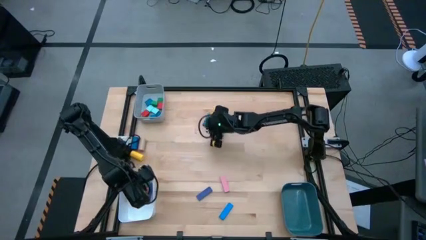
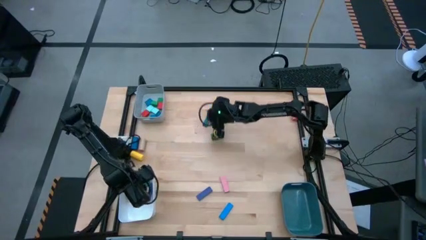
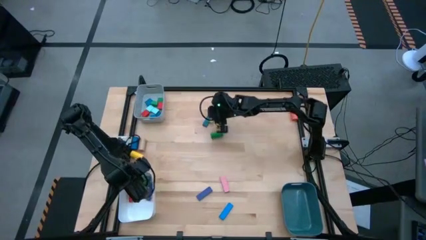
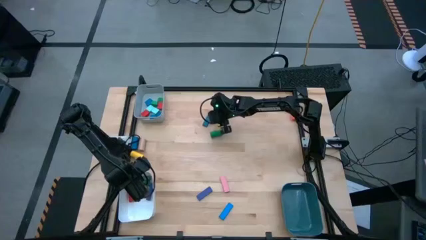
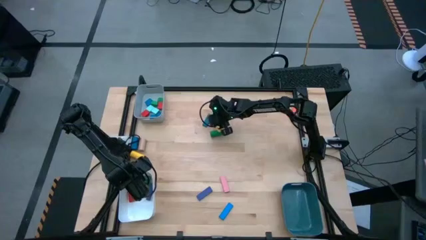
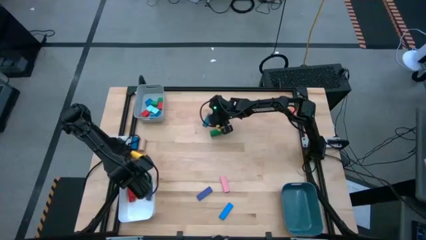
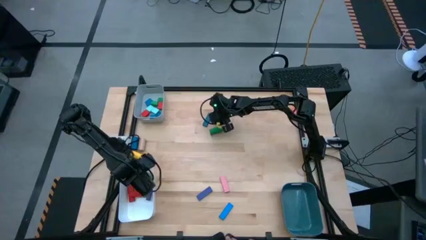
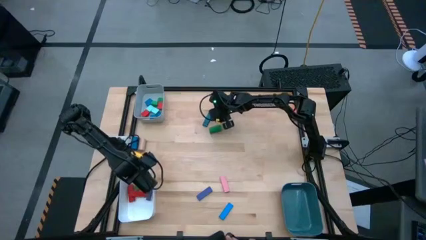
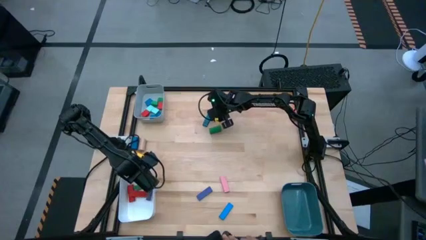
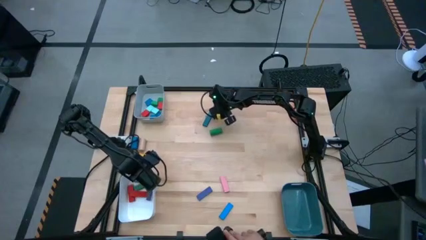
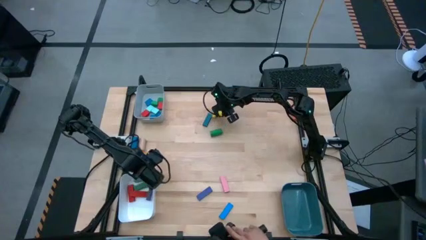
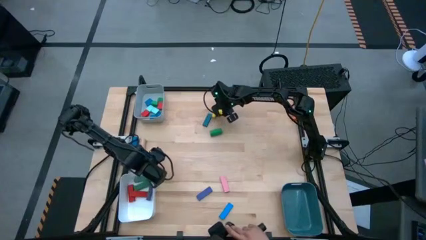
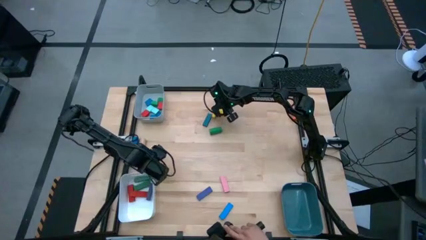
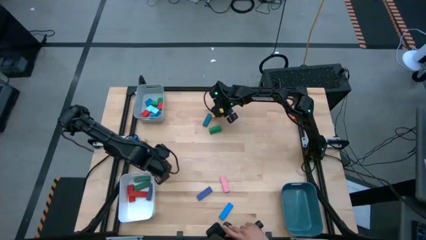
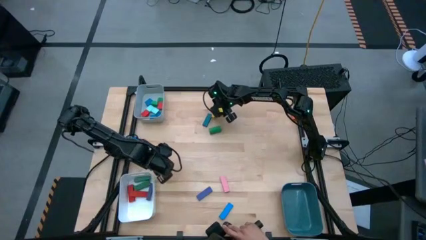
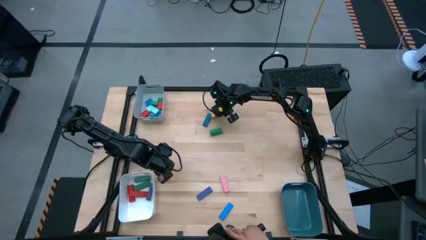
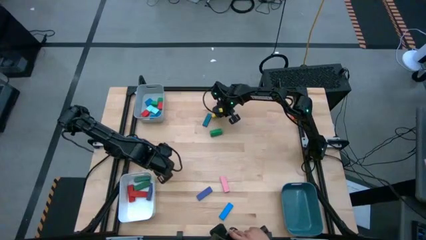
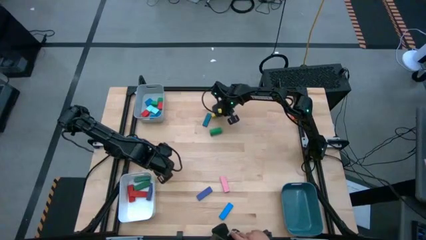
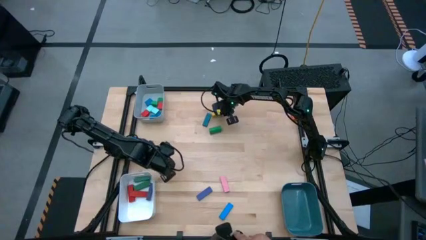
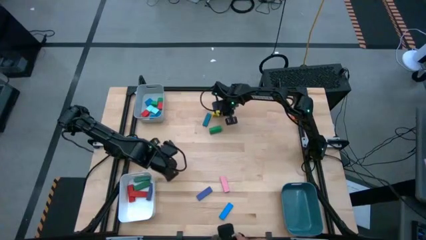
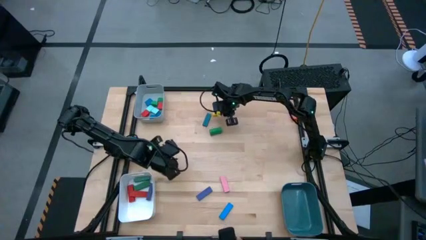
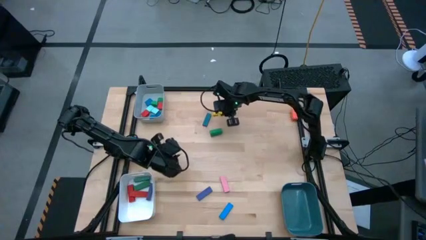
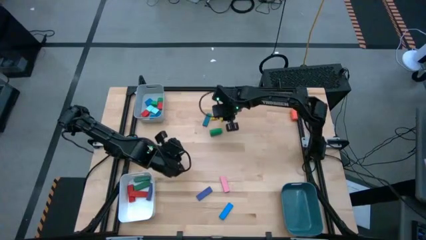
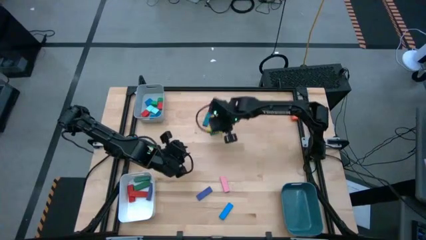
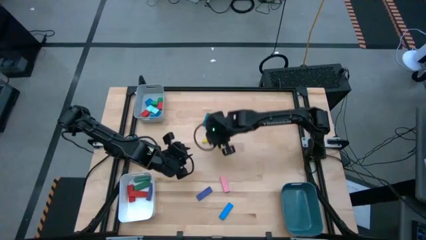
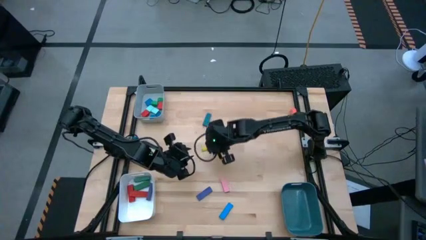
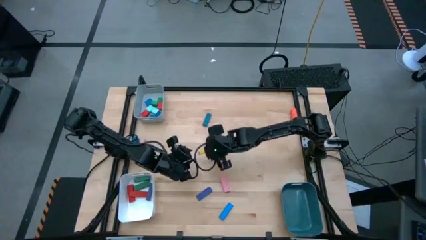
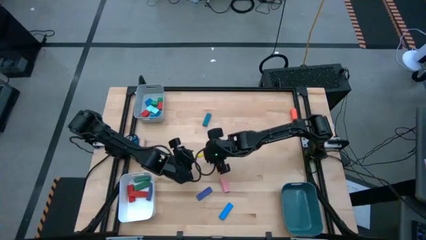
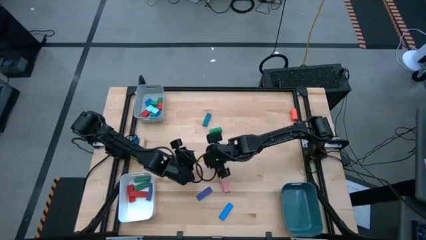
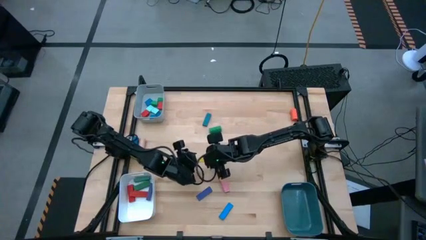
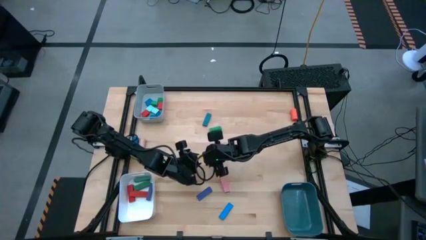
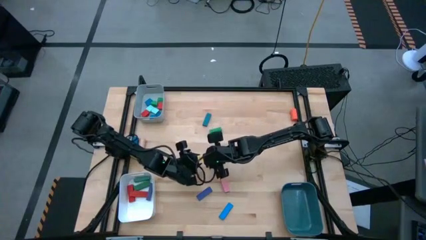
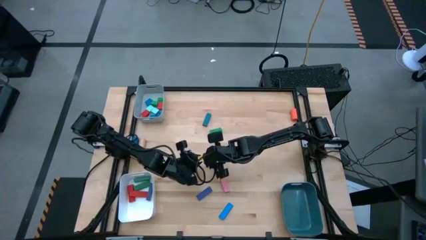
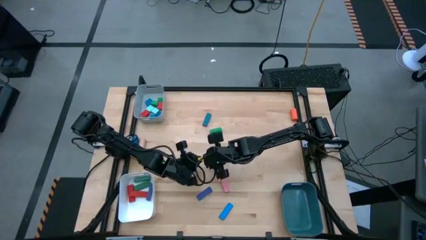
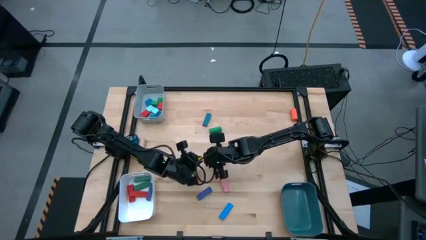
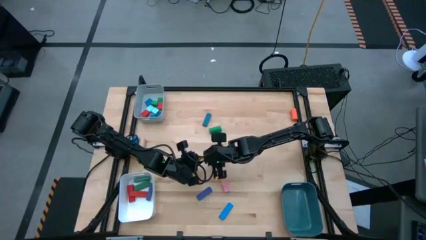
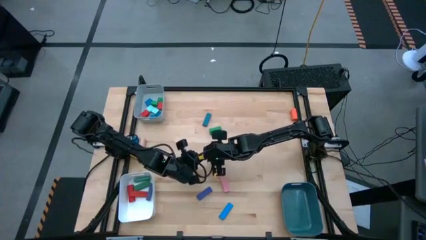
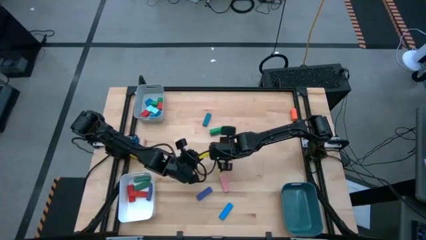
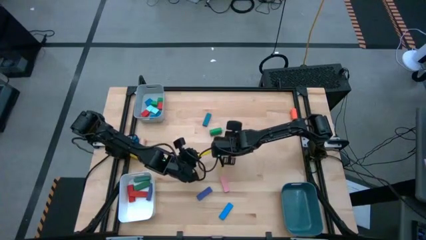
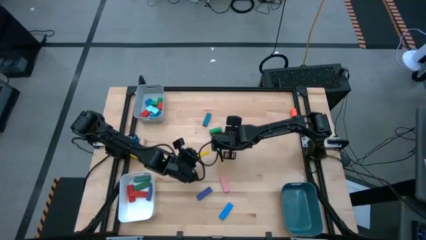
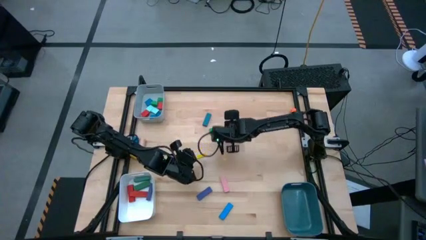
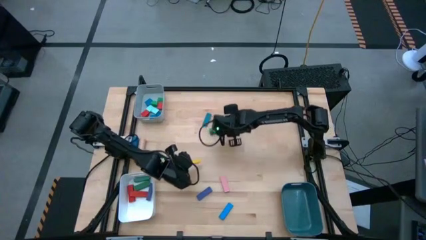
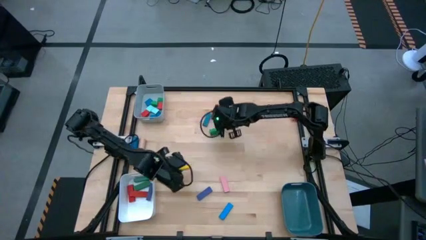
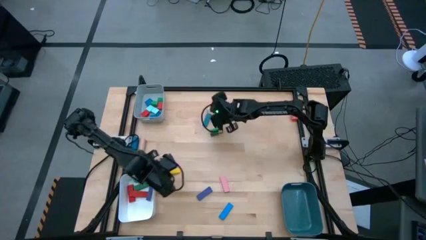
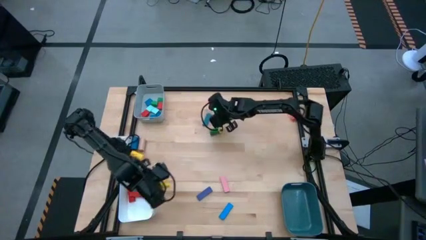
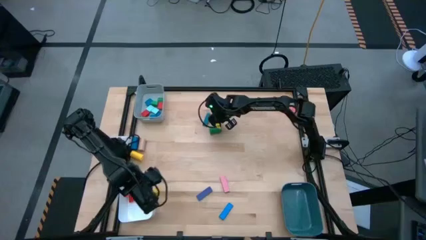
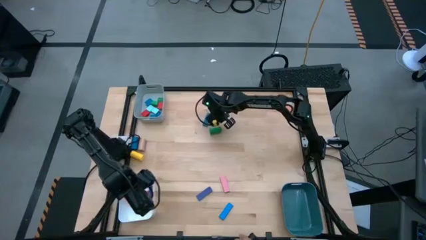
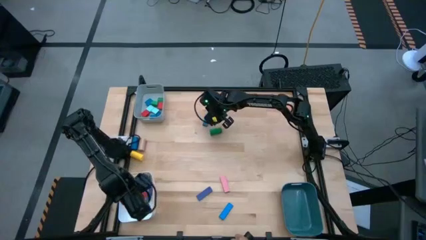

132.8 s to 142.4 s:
Task: Sort blocks by size
Put the yellow rectangular block into the white bin

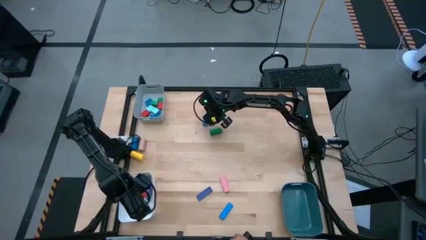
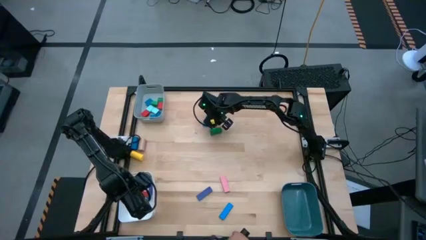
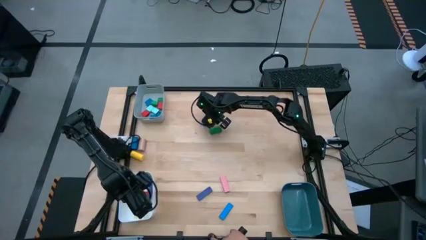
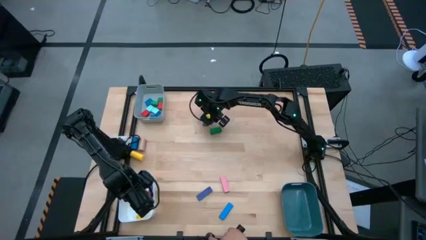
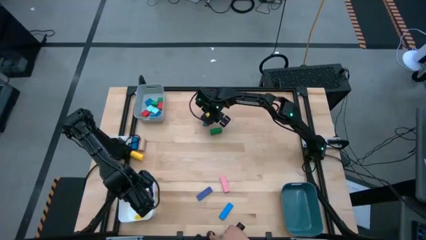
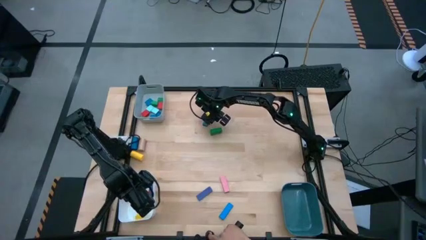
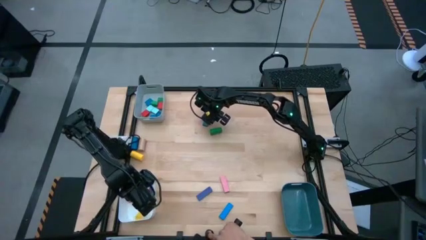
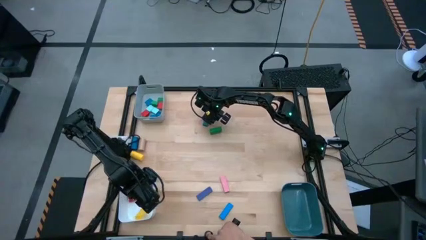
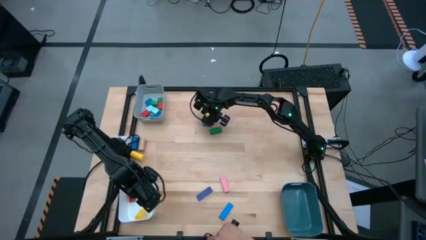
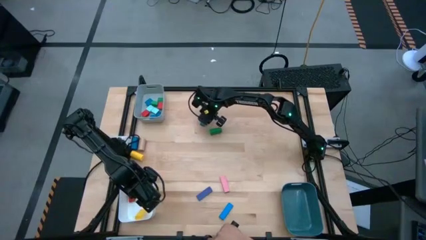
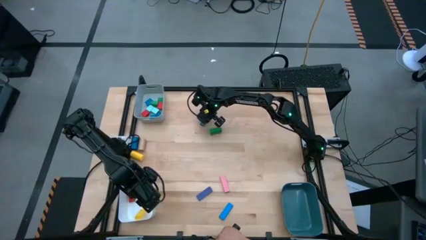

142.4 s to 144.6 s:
Put the blue rectangular block into the white bin

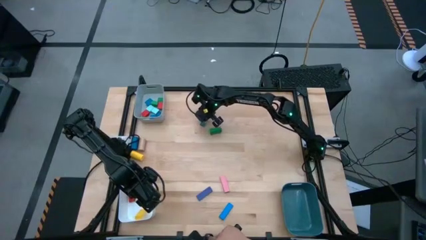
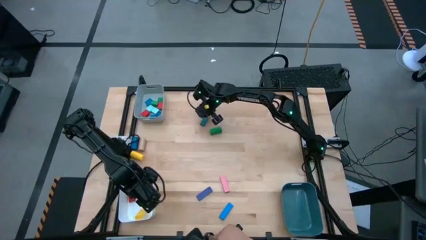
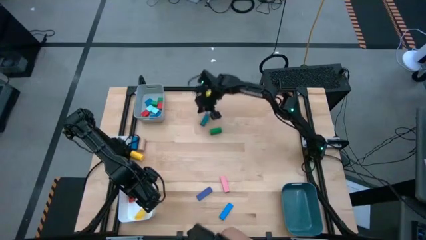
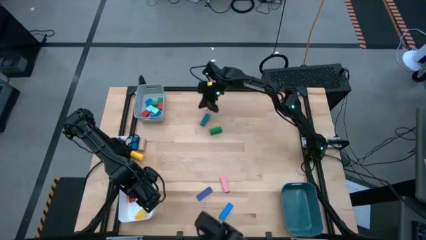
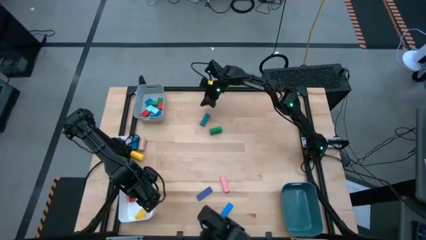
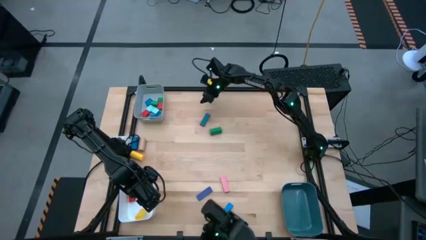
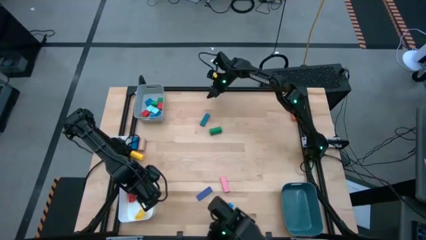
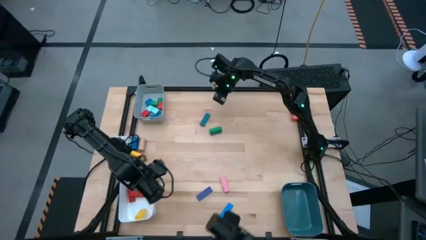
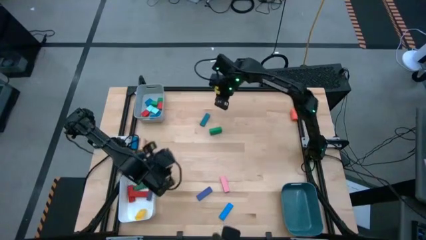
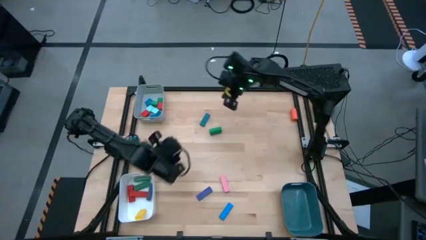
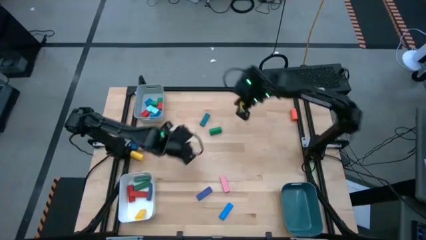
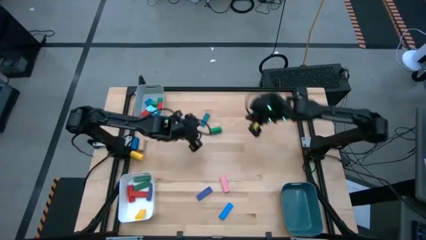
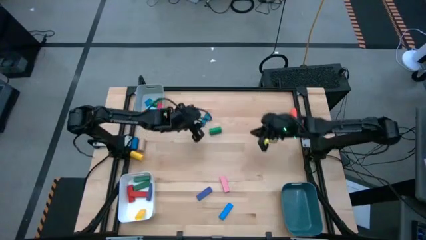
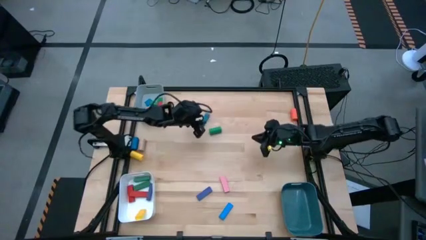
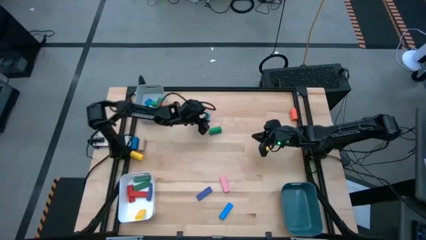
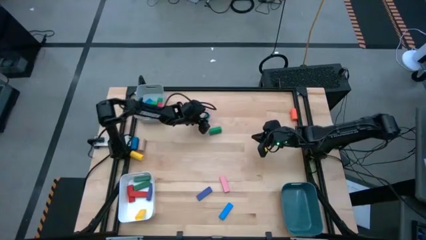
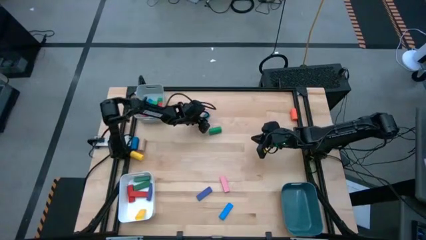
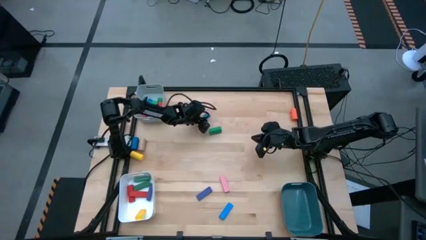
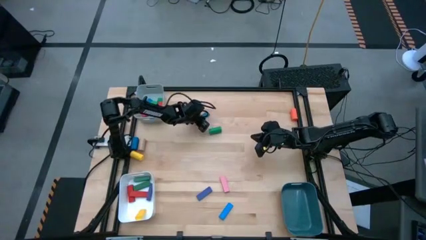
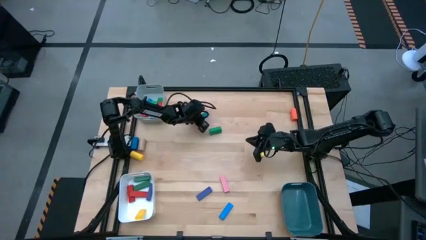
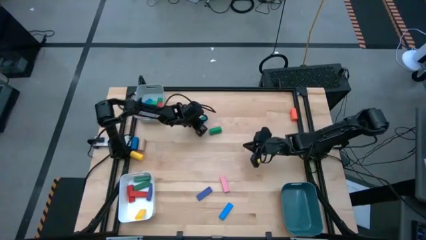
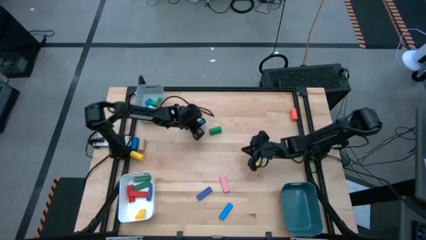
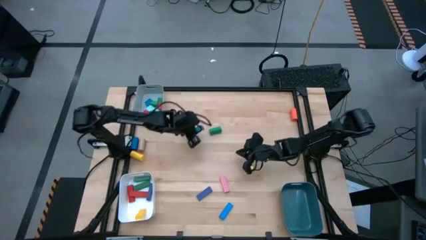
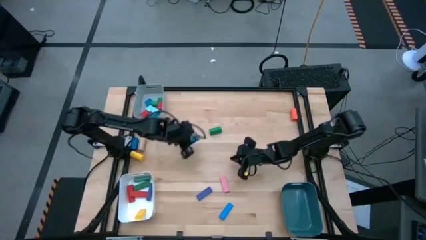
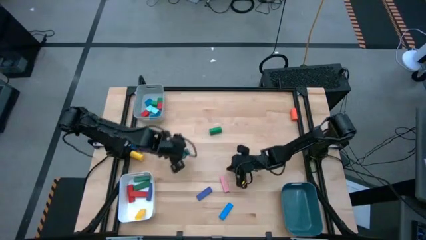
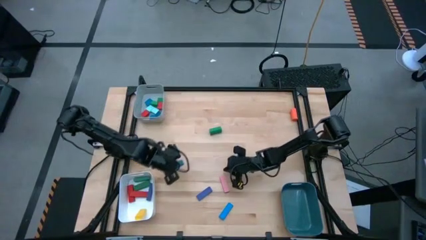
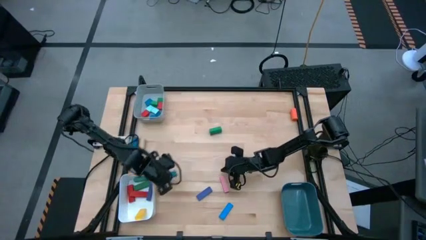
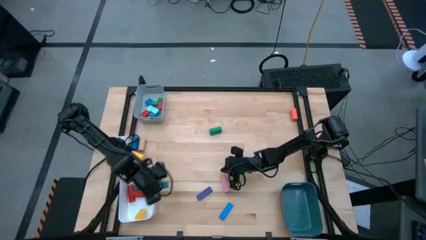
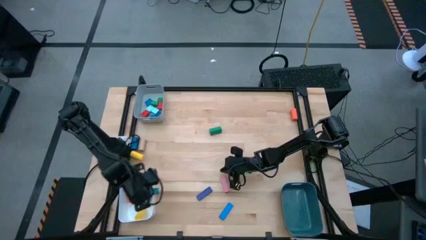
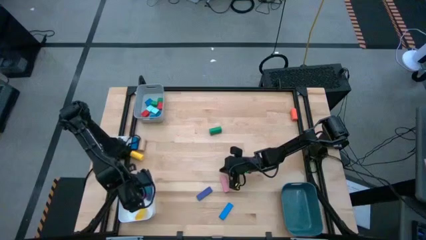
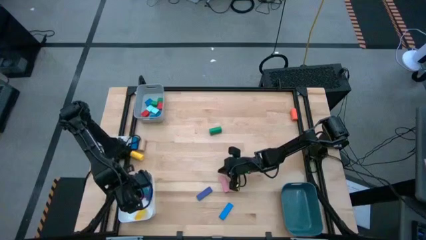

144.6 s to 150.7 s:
Put the blue rectangular block into the white bin
